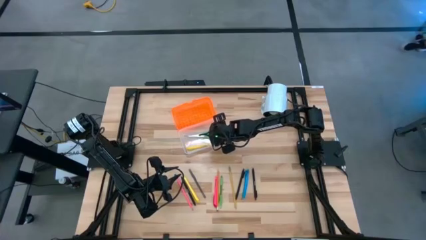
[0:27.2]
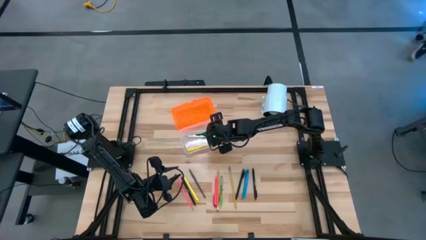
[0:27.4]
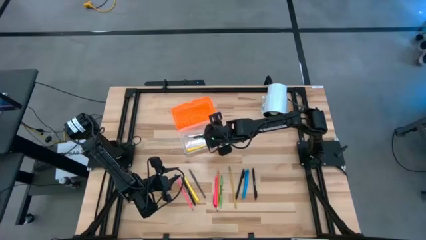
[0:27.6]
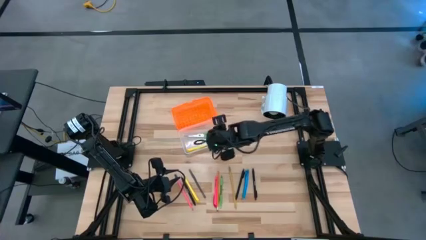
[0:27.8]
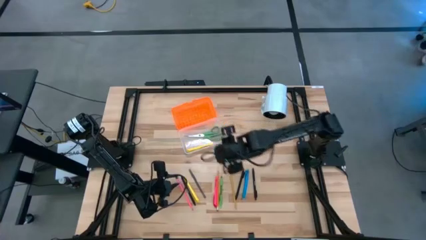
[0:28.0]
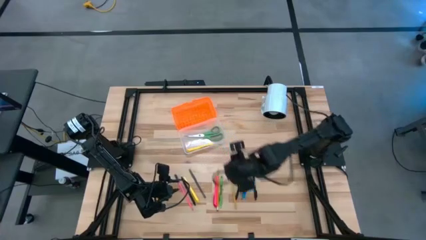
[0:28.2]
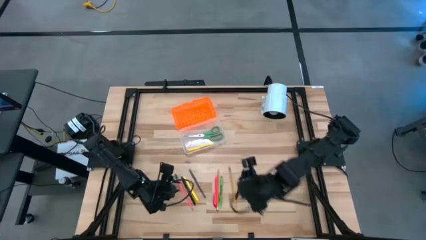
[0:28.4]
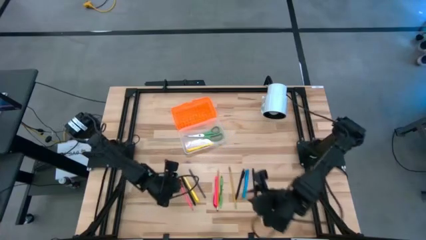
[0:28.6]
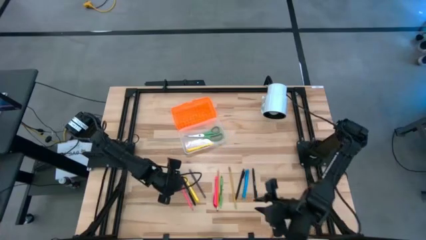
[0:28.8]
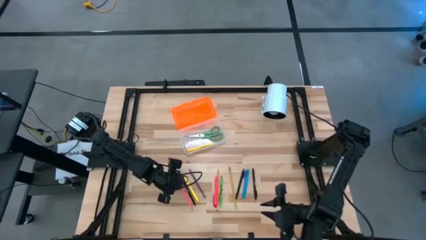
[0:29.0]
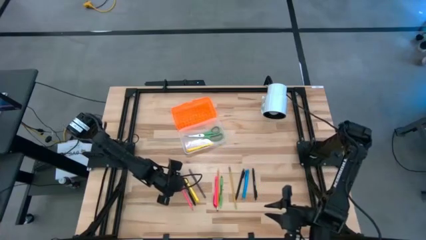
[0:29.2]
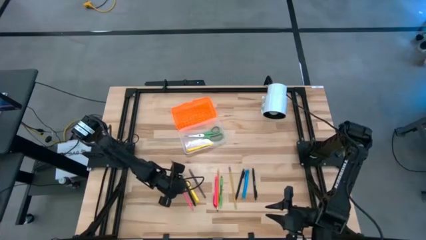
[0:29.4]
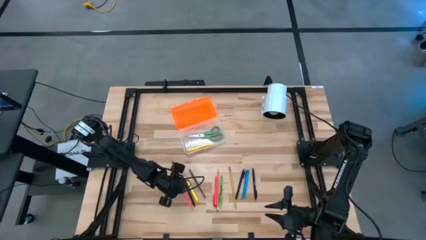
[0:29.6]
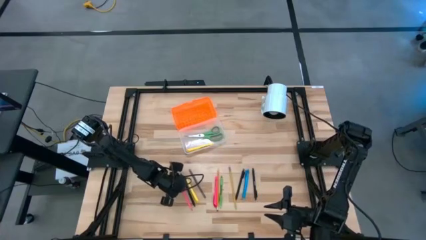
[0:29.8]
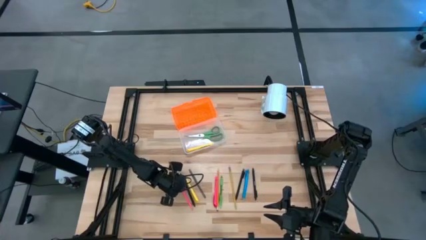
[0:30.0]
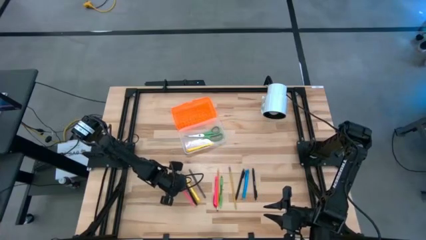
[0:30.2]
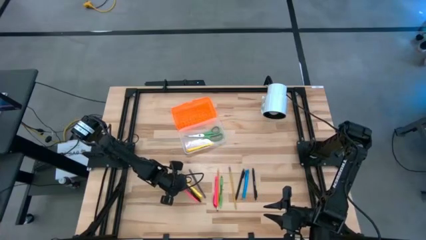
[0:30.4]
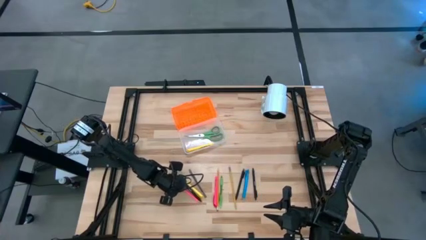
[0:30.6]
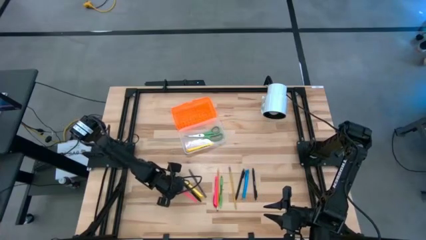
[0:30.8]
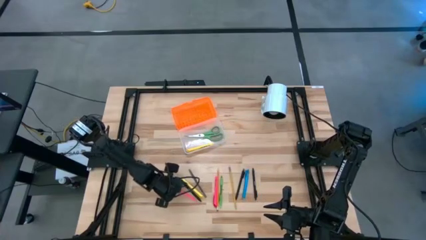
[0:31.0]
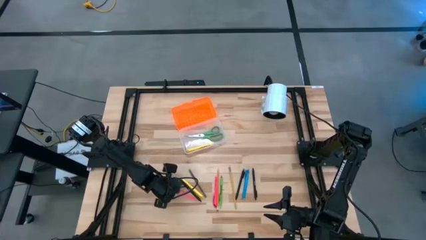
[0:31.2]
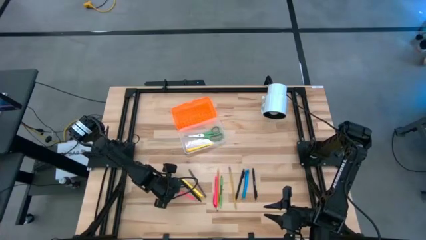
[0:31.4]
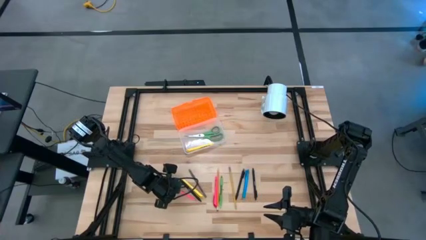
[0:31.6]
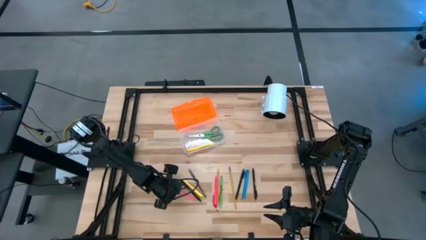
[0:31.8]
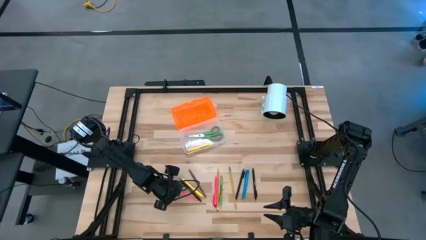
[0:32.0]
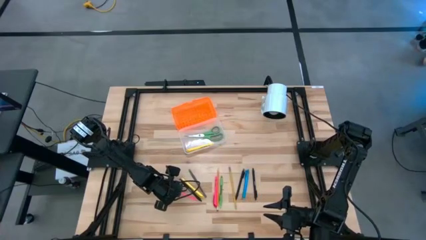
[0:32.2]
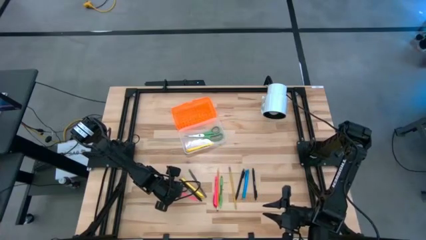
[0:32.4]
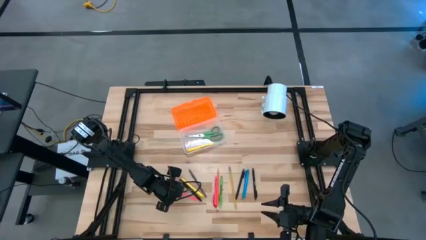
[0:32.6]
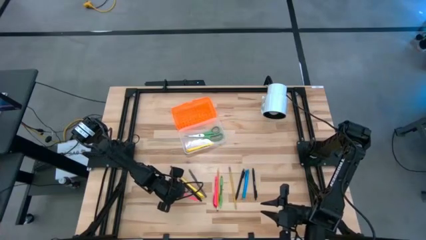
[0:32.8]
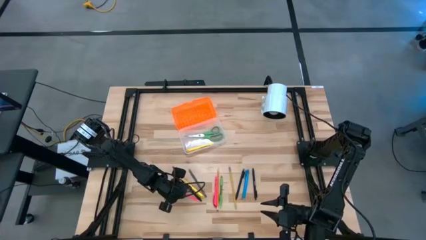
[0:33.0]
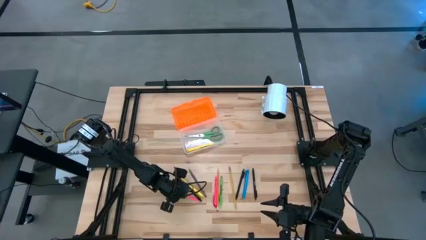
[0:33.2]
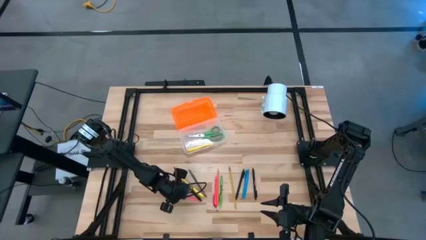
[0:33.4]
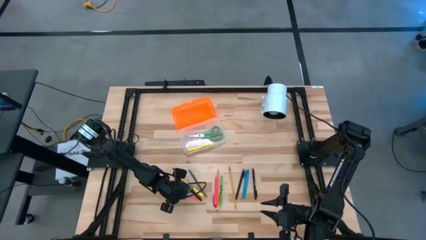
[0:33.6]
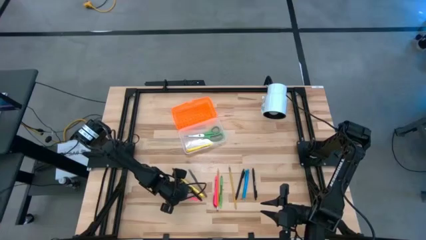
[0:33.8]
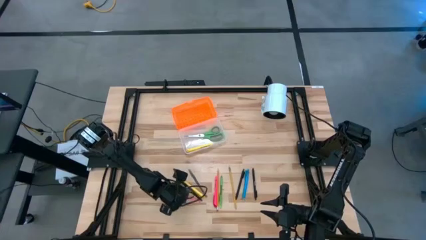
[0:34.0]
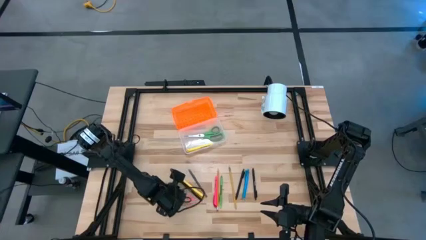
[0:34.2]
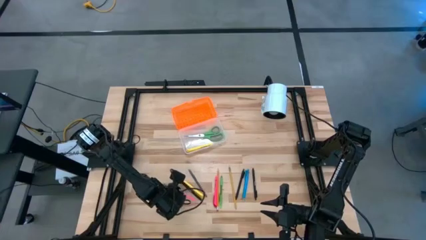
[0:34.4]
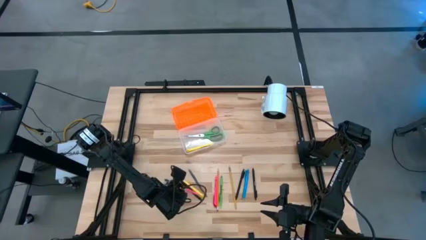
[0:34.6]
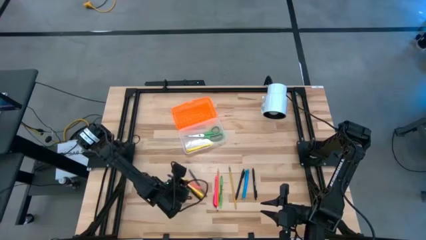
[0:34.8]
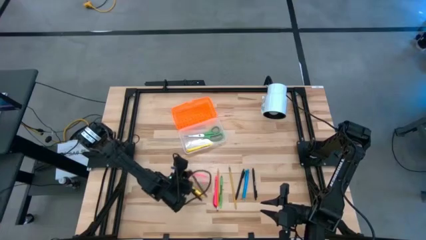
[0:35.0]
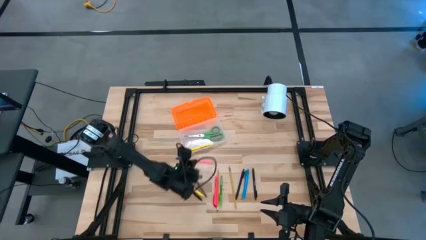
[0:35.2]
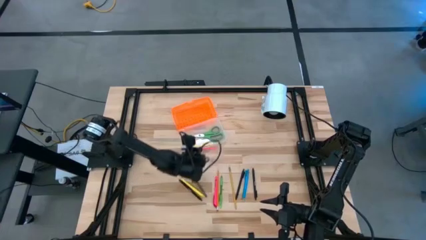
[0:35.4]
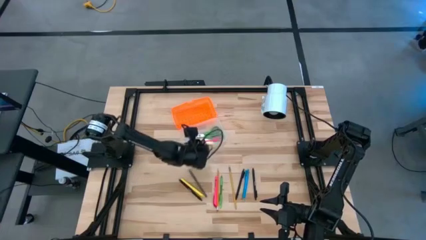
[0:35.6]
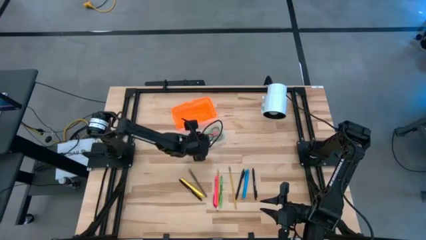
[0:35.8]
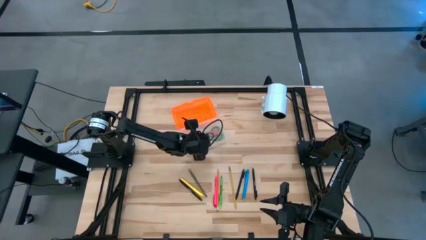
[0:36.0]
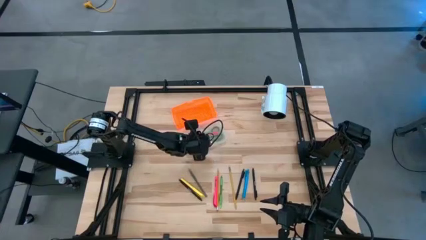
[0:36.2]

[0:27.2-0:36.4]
Task: Pick & place school supplies into a supply box
Put the pink pencil into the supply box
